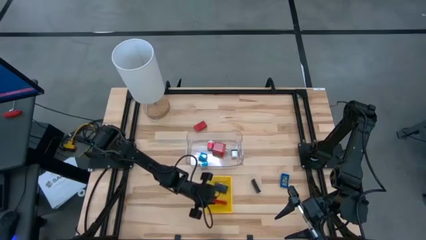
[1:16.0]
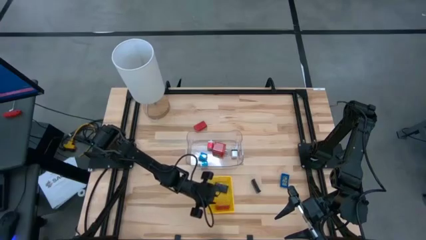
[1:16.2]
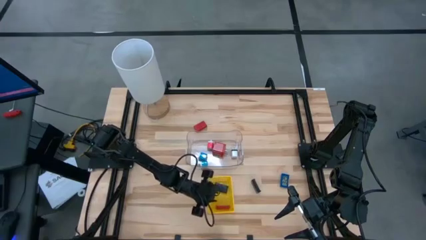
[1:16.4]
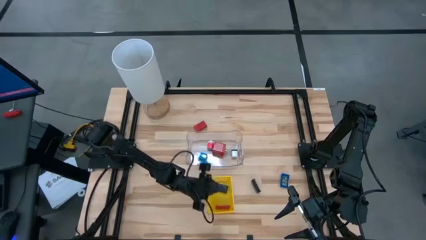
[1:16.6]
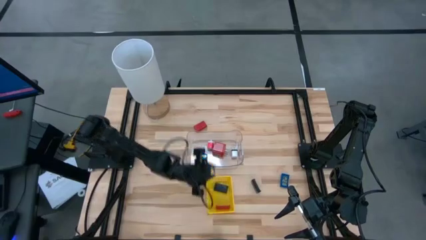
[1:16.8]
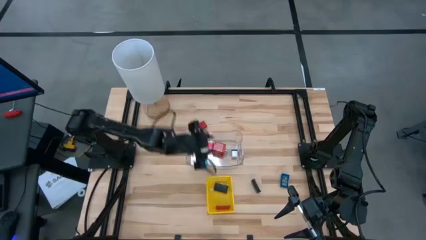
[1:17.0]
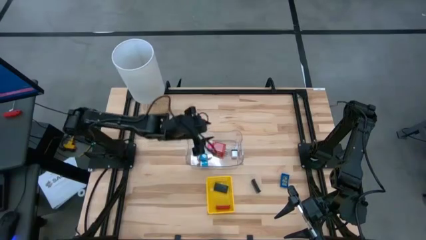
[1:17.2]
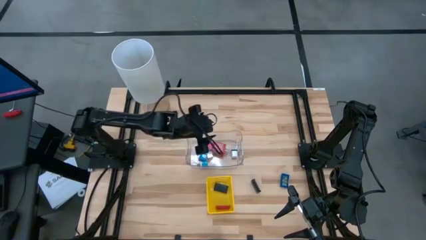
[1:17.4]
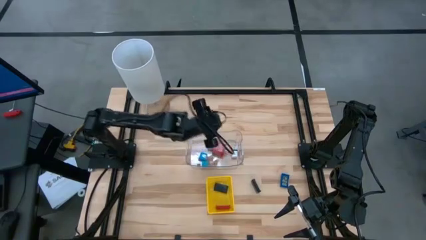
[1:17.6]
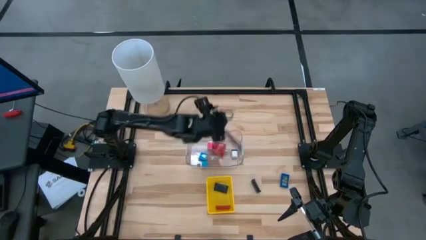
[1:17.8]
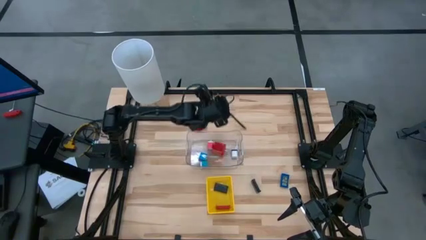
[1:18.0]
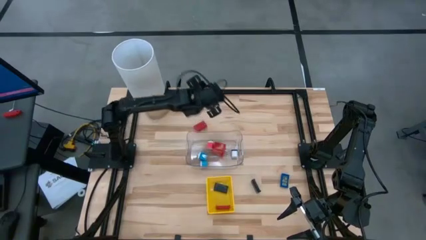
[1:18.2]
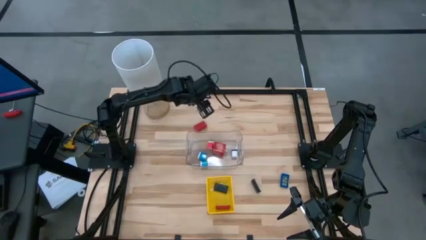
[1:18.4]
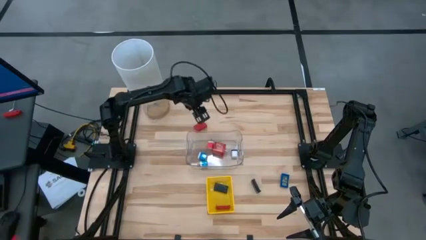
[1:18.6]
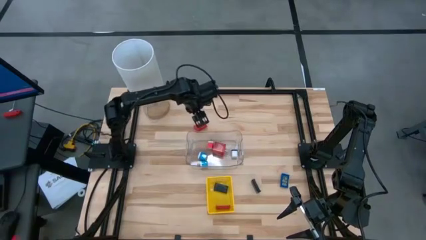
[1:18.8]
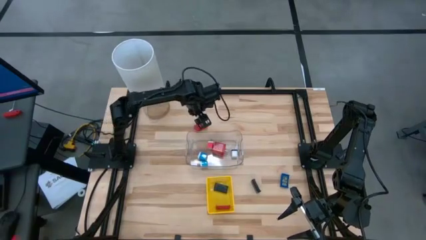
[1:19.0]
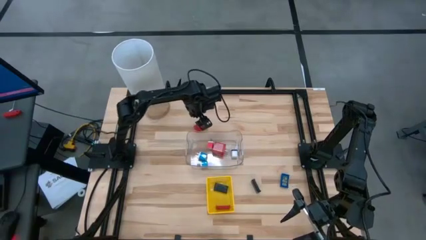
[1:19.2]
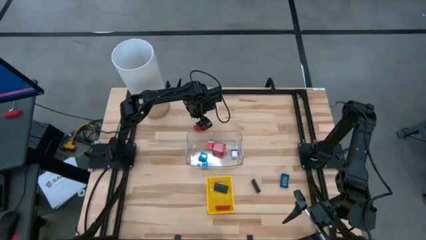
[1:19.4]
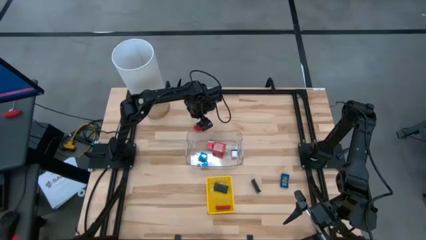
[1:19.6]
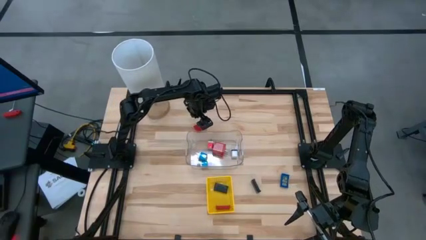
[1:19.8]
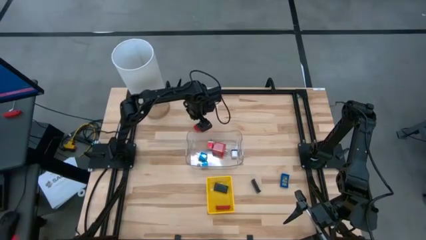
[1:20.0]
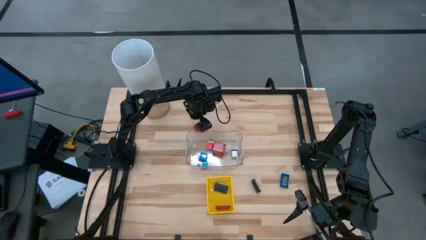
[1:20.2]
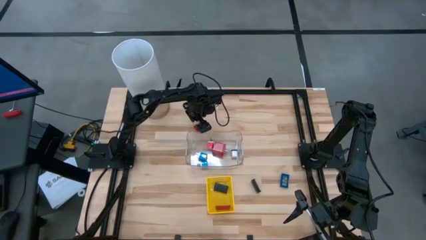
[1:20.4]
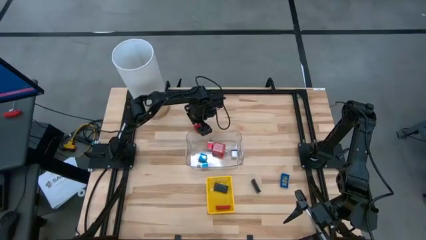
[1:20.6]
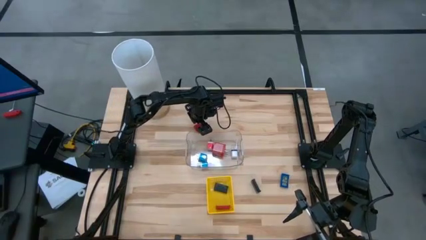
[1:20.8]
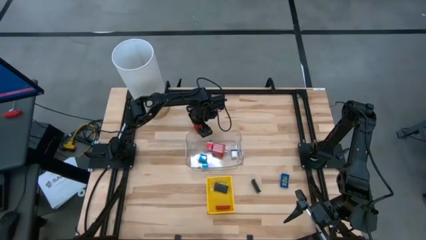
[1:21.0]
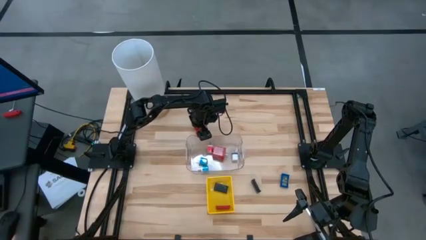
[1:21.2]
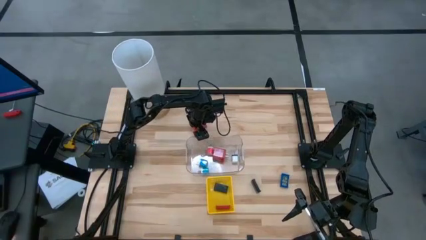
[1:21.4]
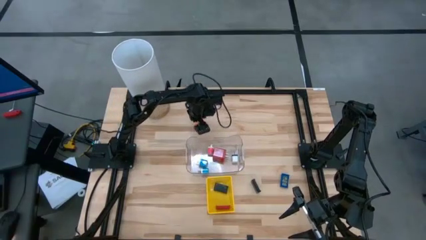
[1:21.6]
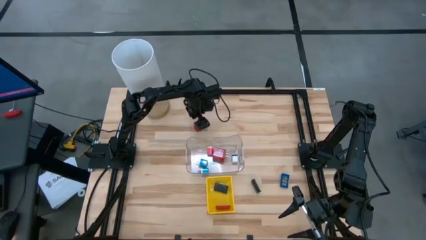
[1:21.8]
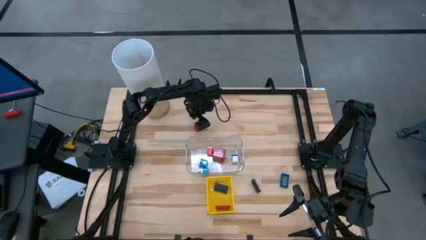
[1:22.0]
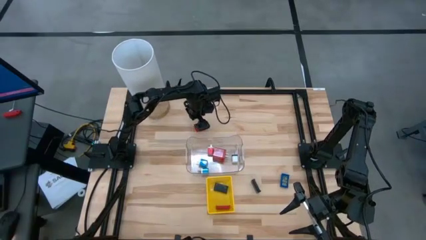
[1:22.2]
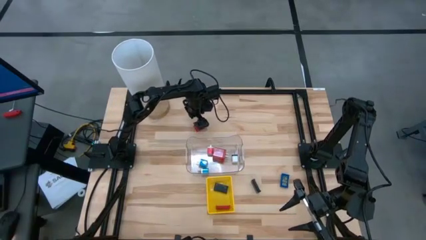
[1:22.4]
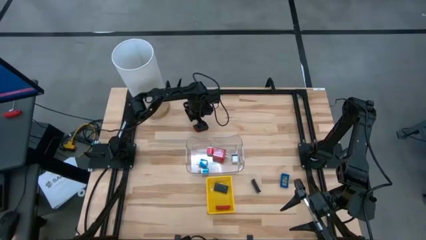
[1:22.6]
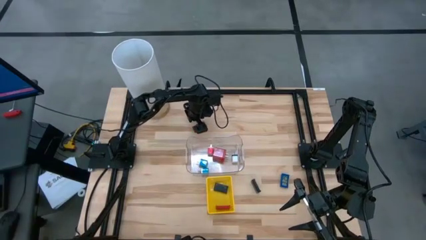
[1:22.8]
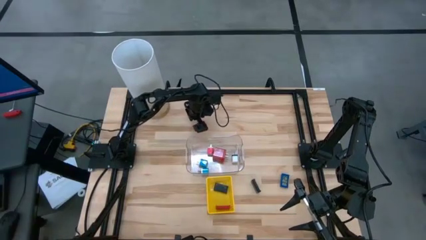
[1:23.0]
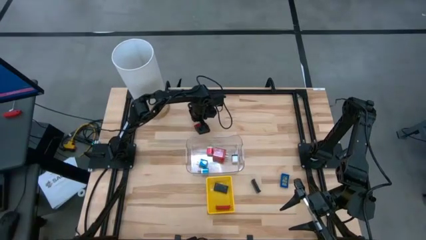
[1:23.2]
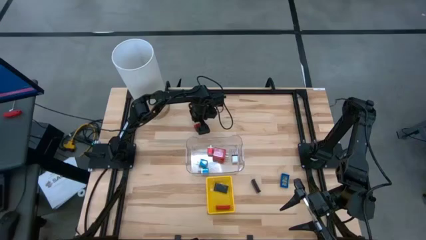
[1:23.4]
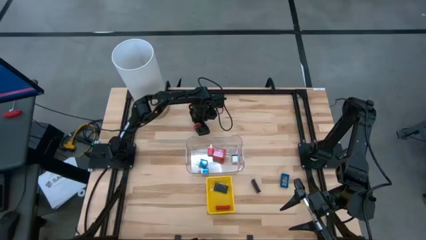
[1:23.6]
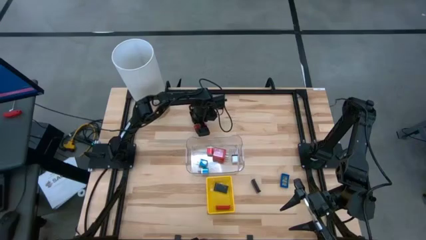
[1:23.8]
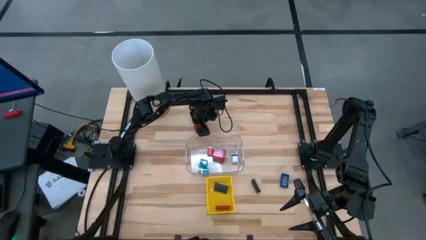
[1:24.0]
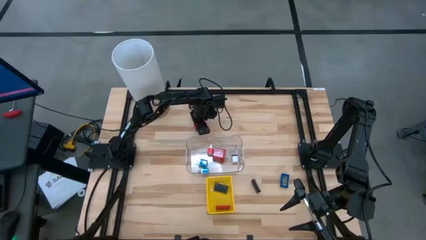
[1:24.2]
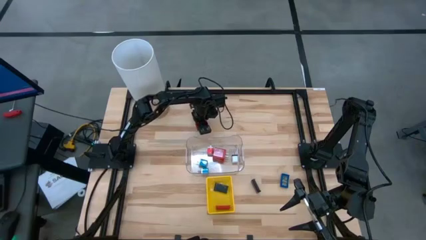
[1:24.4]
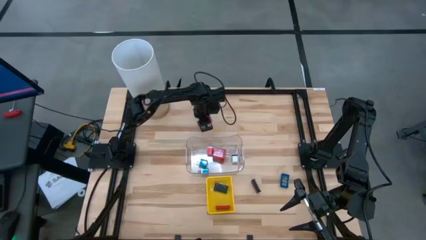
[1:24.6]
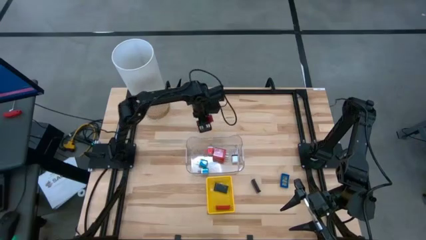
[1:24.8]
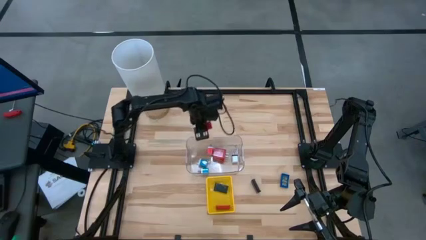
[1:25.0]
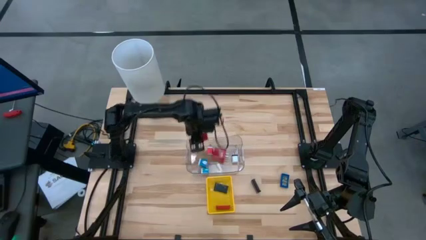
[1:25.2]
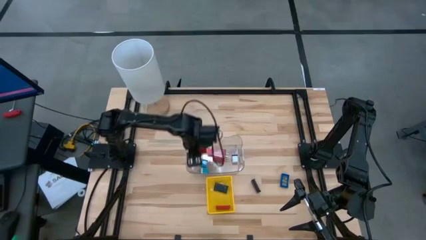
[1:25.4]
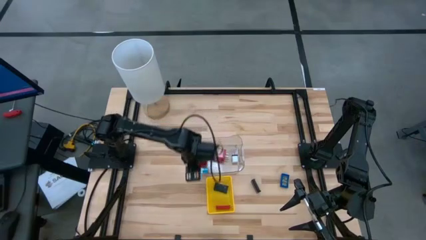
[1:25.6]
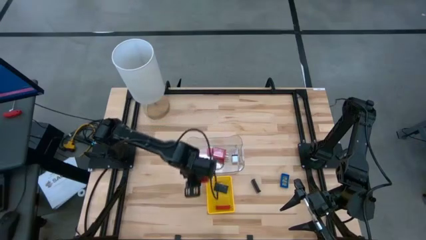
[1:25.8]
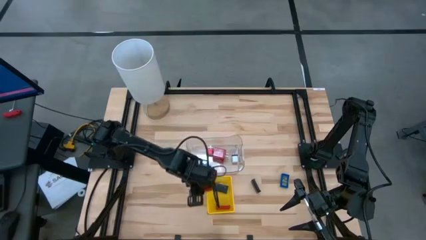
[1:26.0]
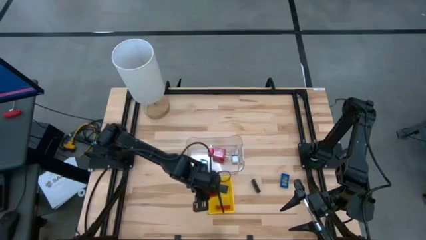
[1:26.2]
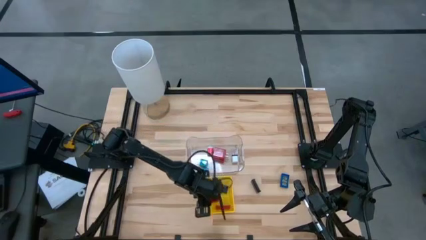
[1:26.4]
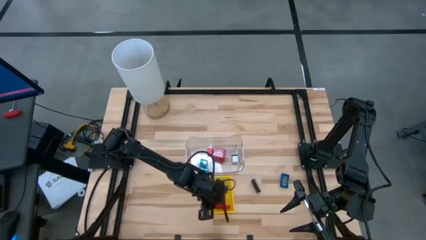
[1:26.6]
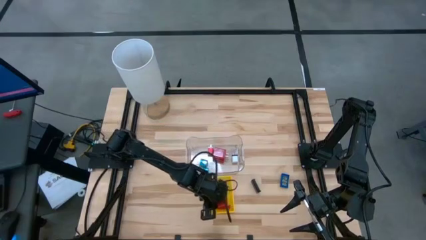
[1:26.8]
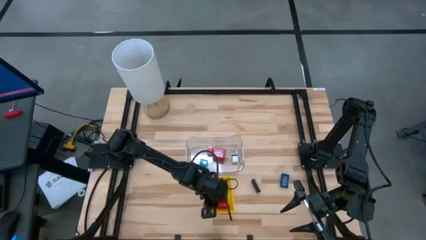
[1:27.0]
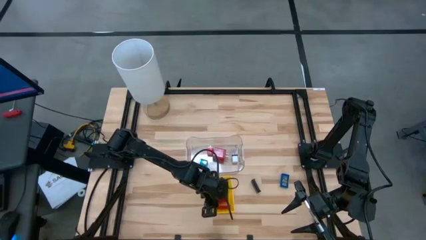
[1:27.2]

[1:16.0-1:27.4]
Task: Pick & Place Office items
Put the red digital clock into the yellow bin

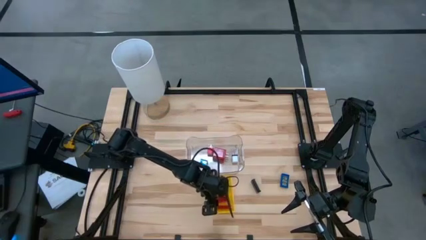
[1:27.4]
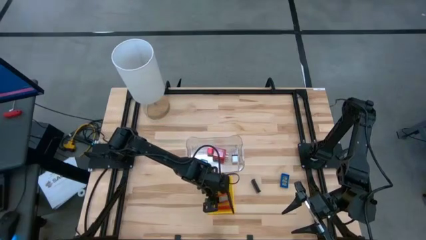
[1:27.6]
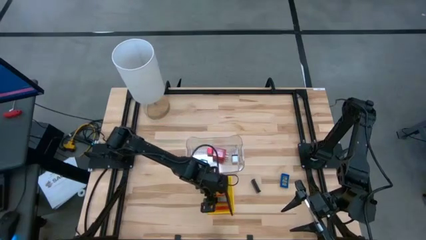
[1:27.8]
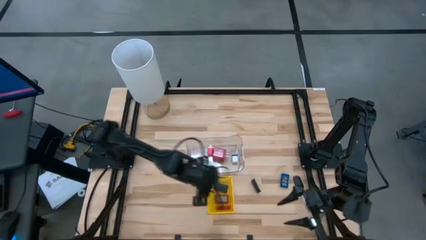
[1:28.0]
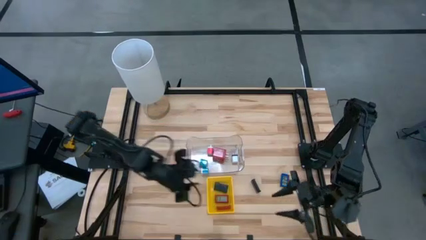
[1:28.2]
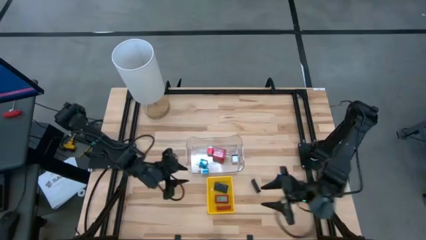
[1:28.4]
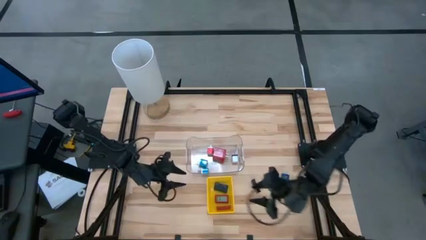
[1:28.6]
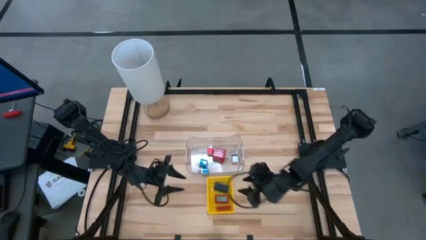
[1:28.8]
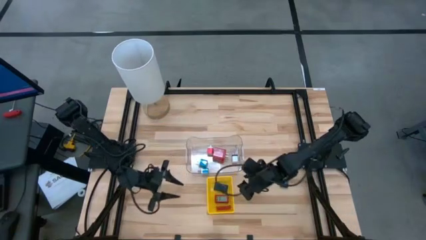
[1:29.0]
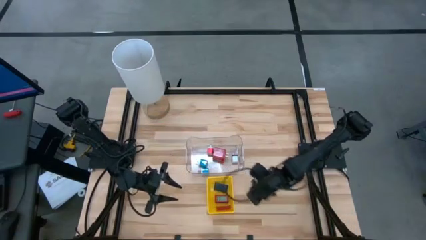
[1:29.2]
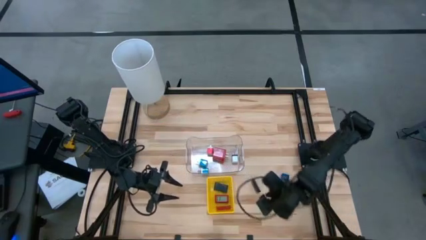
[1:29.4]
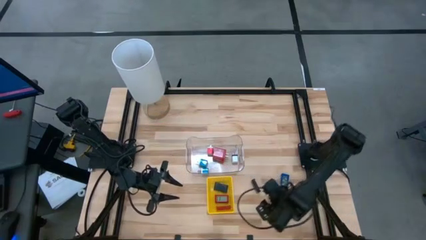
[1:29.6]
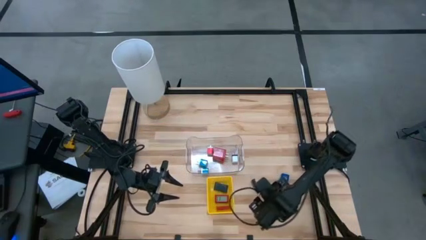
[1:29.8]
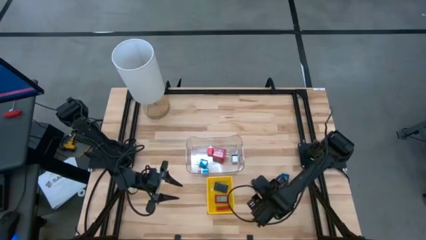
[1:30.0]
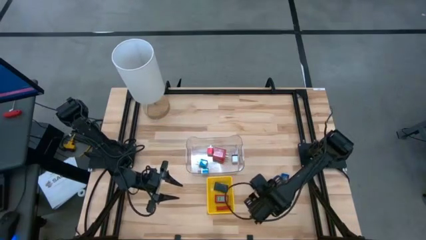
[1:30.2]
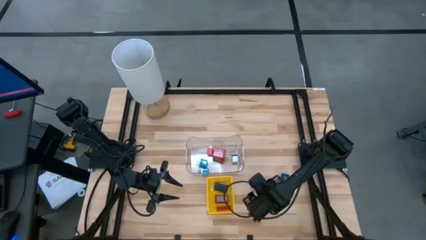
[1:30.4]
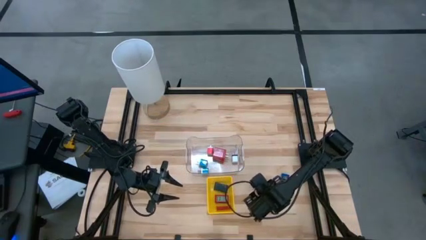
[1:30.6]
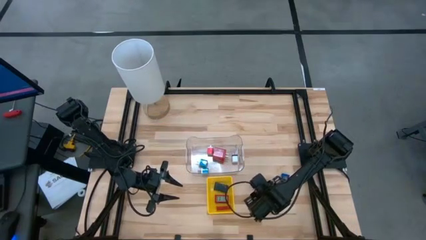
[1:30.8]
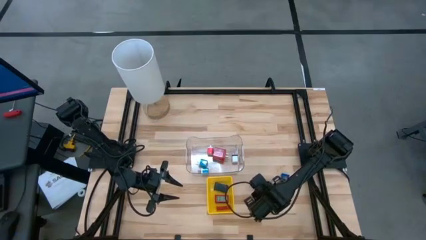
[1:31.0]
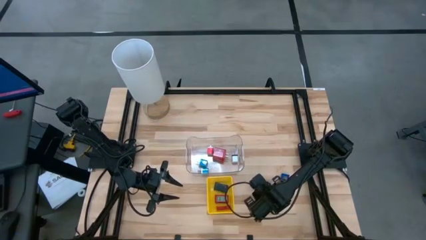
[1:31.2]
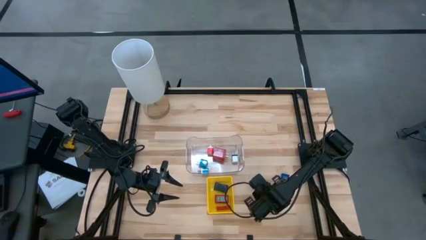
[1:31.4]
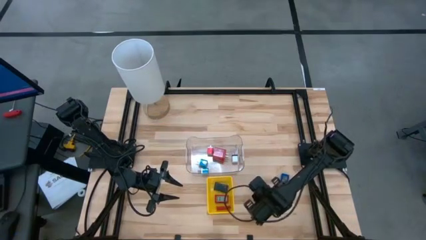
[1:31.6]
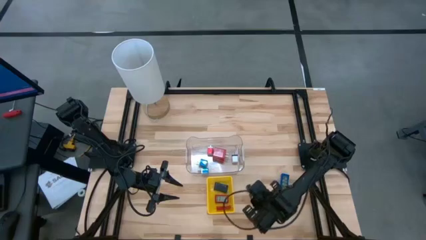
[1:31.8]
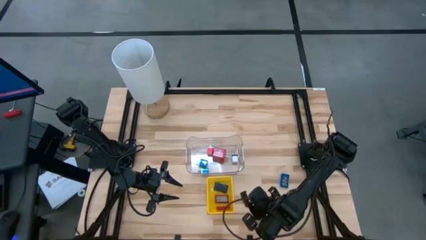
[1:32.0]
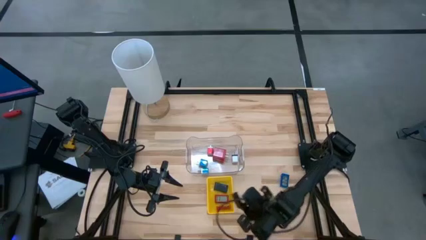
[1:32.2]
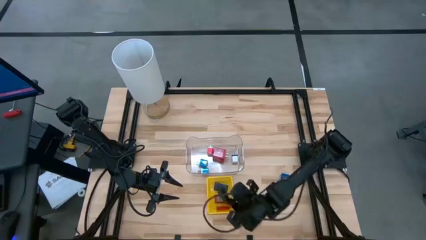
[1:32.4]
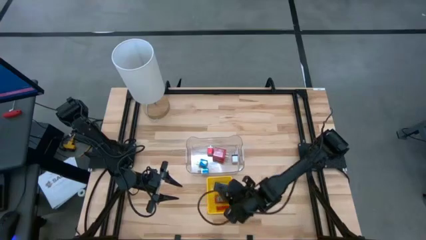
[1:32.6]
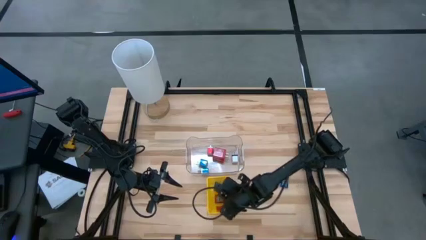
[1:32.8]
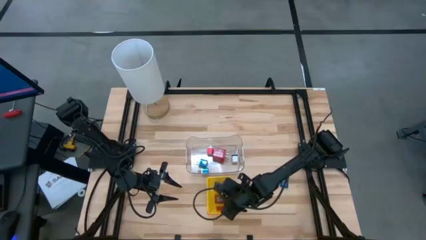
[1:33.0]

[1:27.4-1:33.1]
Put the black digital clock into the yellow bin
